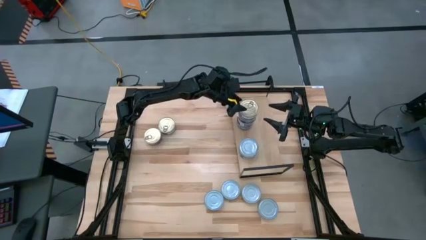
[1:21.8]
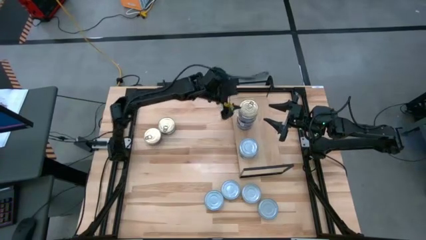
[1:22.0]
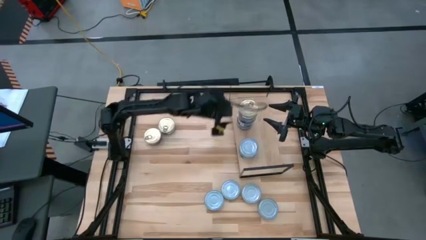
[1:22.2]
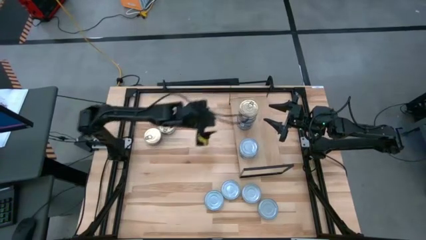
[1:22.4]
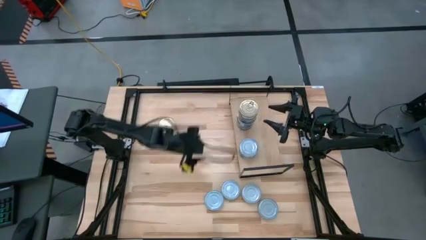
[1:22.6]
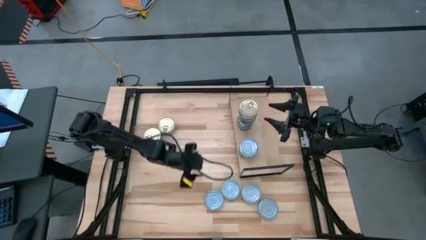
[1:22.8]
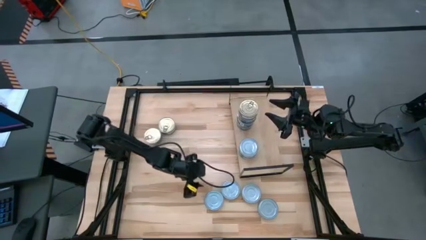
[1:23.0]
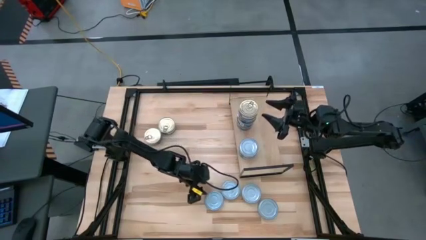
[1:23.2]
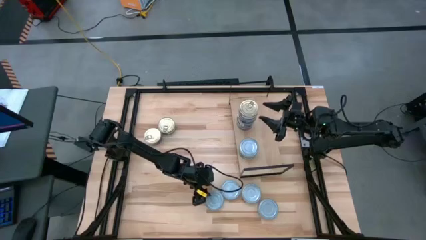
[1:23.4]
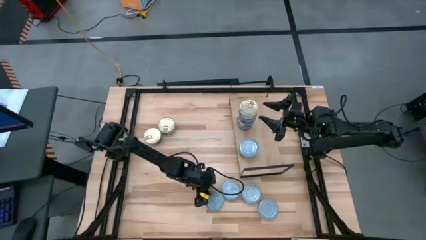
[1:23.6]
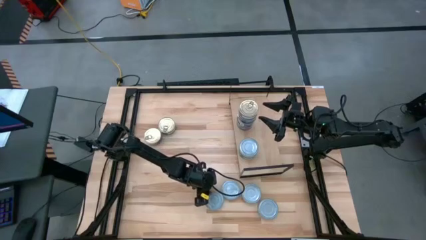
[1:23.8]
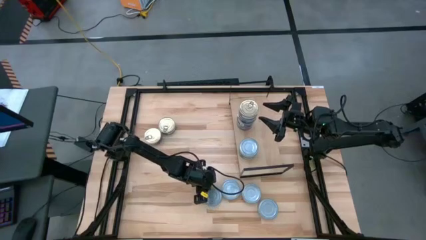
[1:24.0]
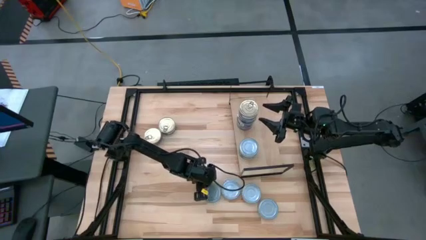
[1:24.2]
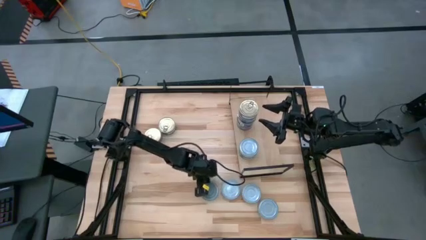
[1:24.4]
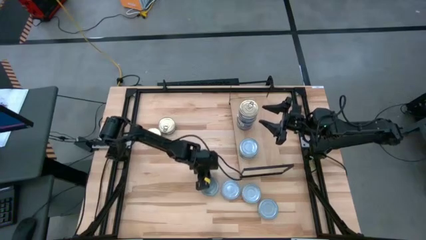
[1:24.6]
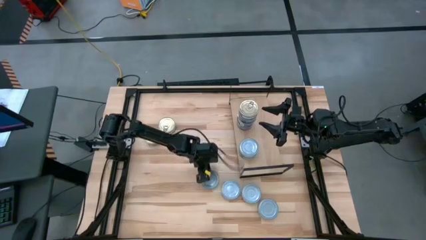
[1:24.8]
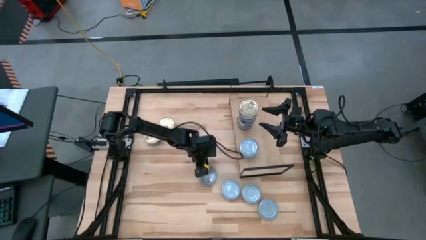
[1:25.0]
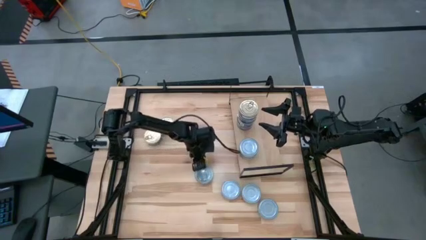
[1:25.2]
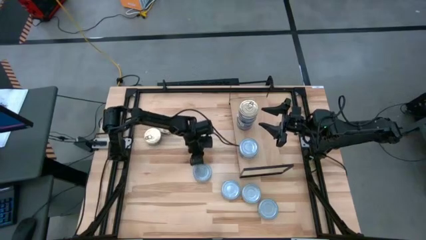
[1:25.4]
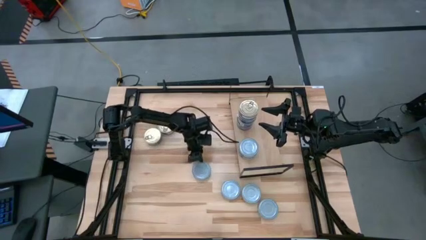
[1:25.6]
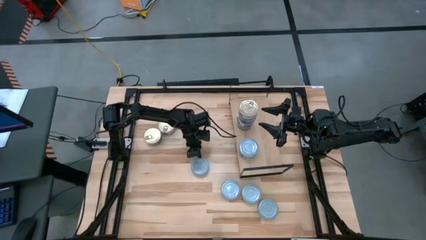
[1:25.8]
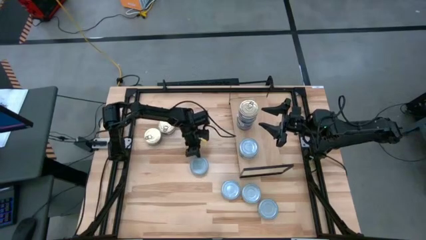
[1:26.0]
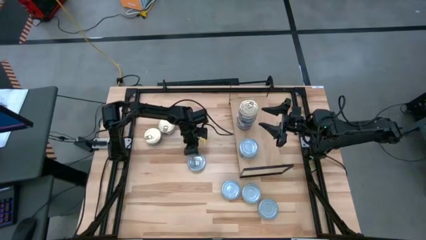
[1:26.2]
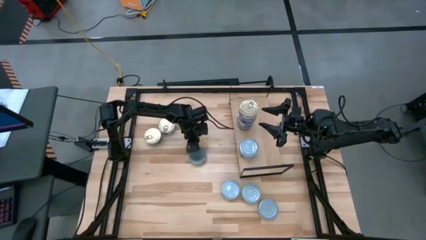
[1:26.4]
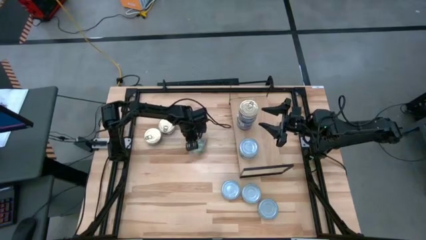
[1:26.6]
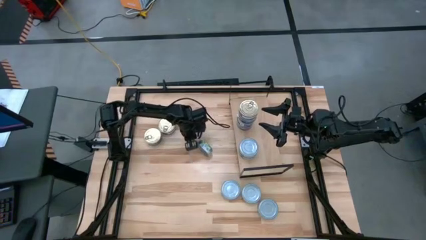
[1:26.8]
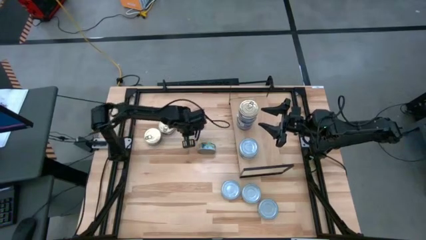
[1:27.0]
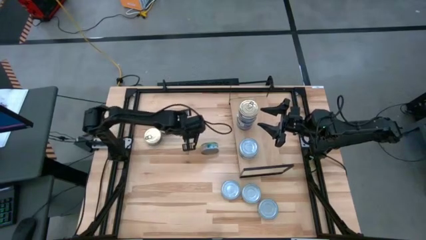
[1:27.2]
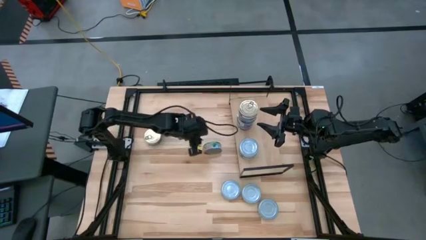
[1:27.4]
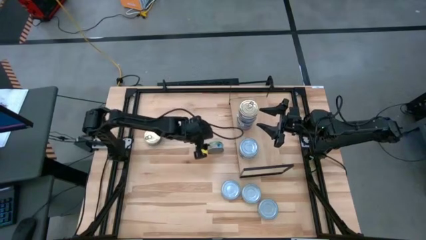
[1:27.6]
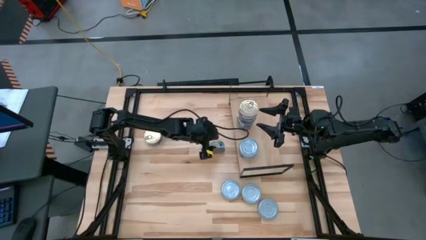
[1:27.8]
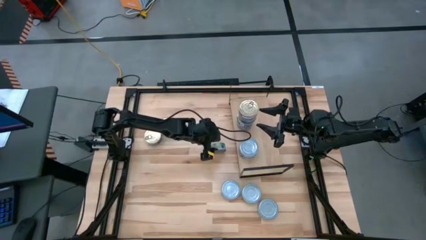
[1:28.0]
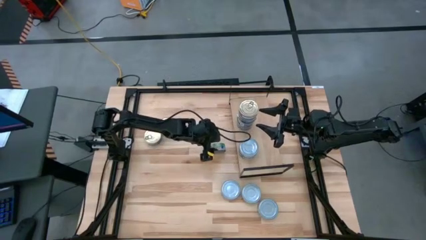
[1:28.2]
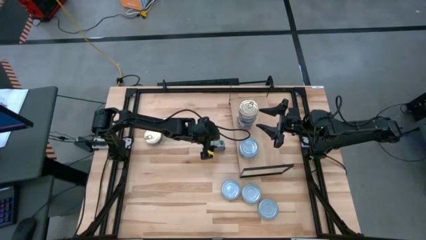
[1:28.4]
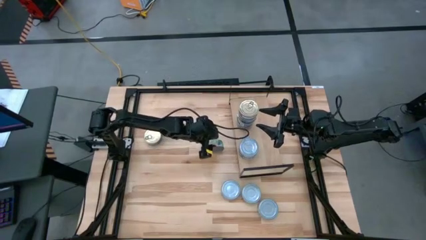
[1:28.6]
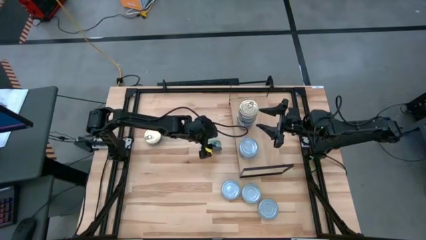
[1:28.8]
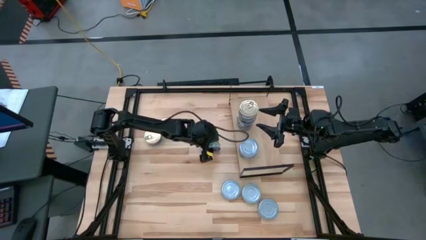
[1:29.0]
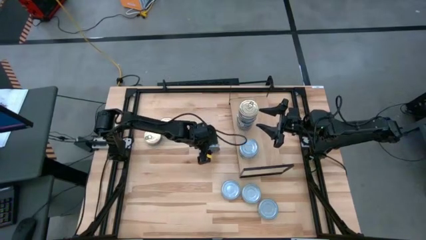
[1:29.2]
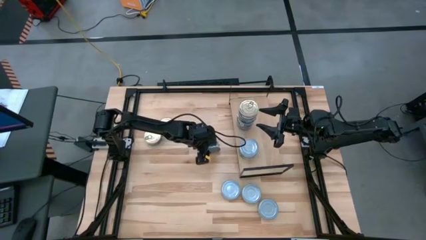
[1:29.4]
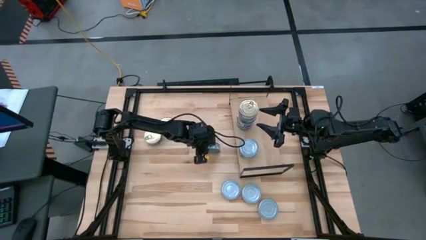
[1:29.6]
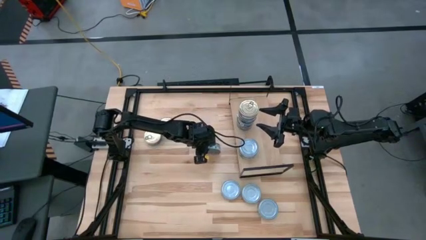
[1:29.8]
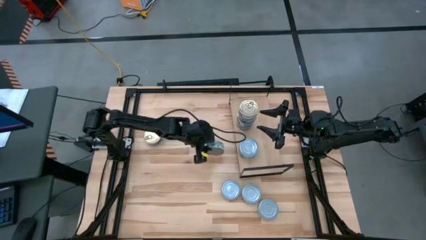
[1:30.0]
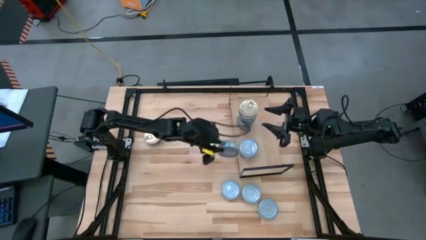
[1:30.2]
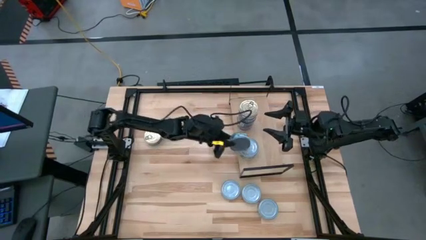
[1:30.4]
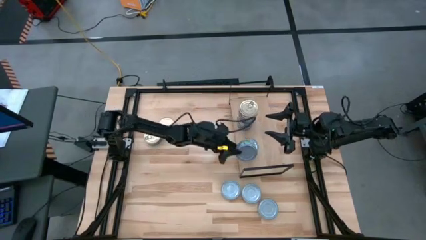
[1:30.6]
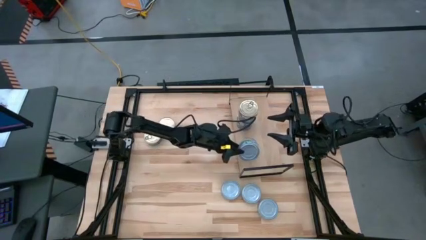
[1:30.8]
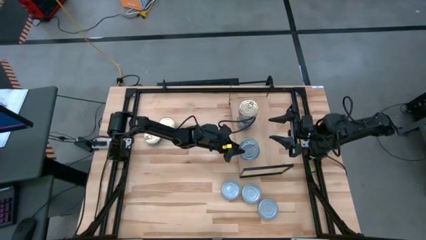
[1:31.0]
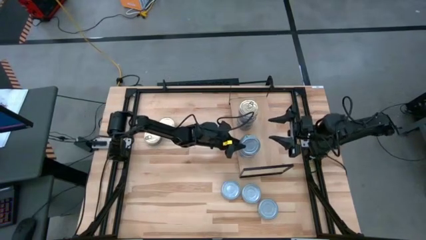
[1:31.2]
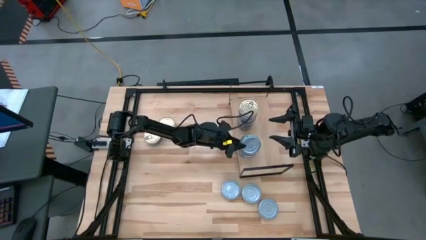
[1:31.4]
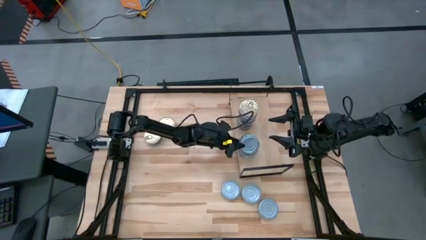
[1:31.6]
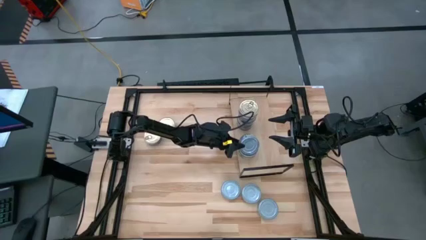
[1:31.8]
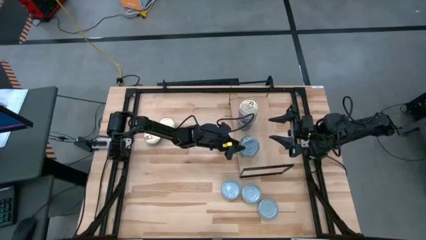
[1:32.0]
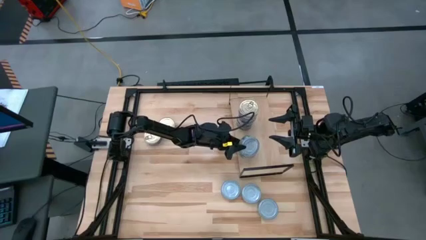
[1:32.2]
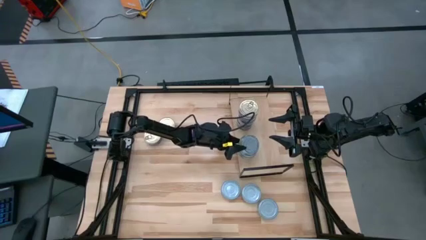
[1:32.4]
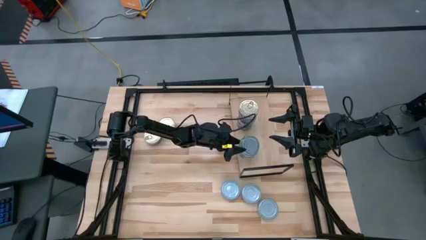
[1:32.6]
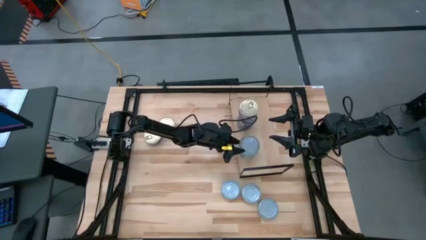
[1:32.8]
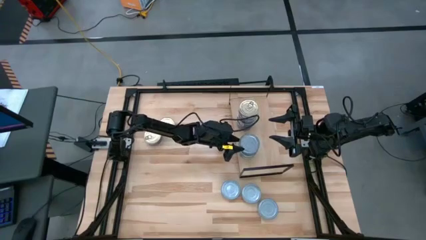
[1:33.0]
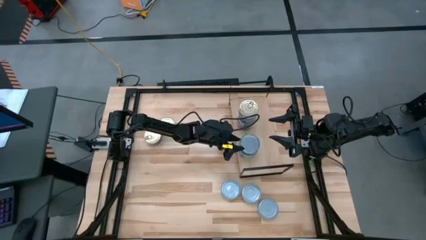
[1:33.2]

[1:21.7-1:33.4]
Task: Stack canned seafood by type on shelf
Stack the green tuna can on top of the other green tuna can on the shelf
